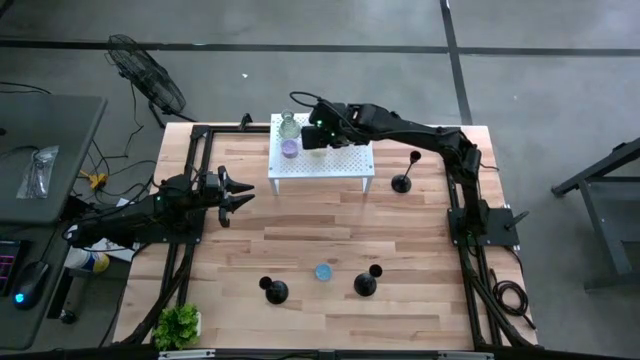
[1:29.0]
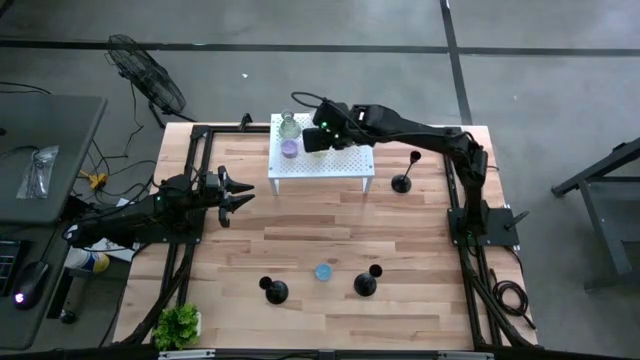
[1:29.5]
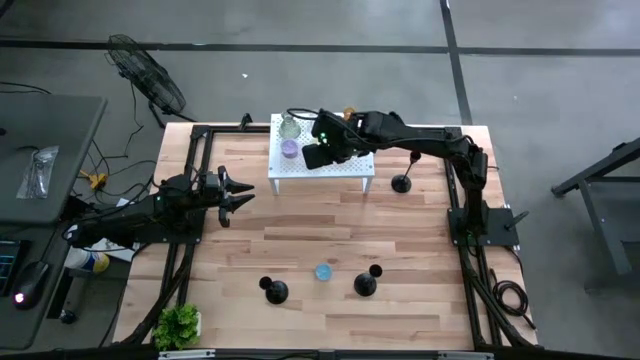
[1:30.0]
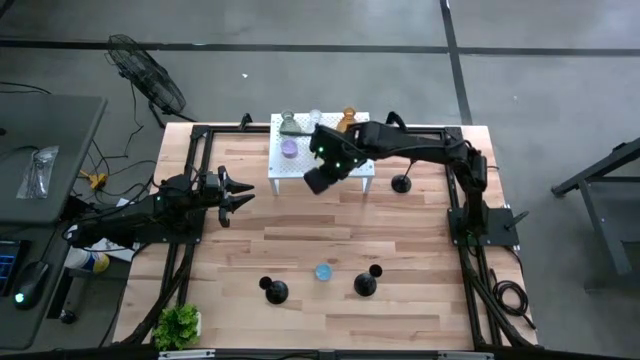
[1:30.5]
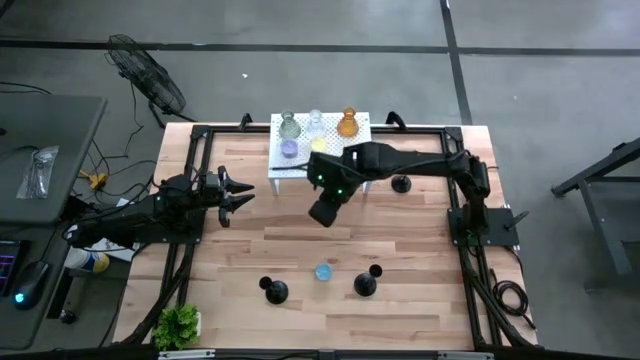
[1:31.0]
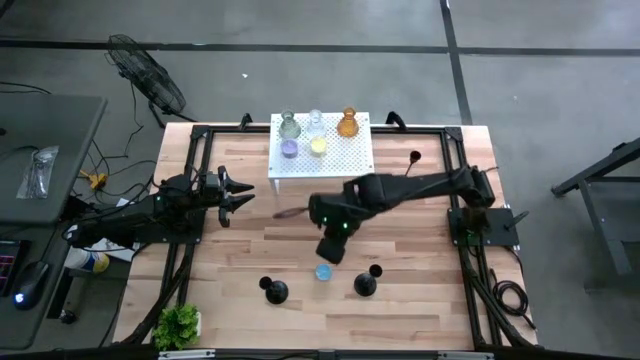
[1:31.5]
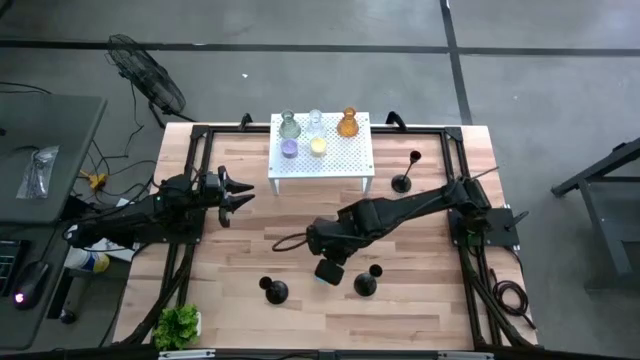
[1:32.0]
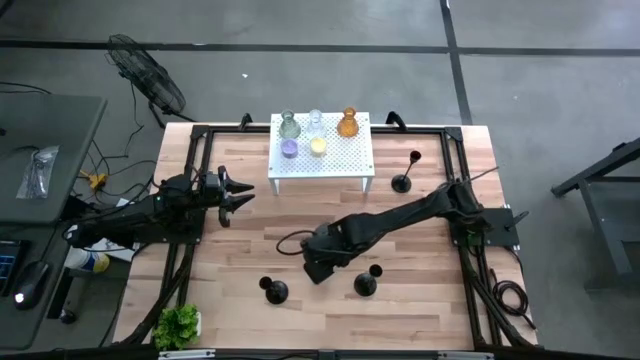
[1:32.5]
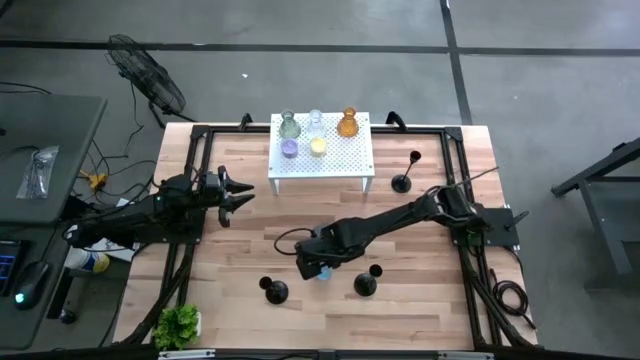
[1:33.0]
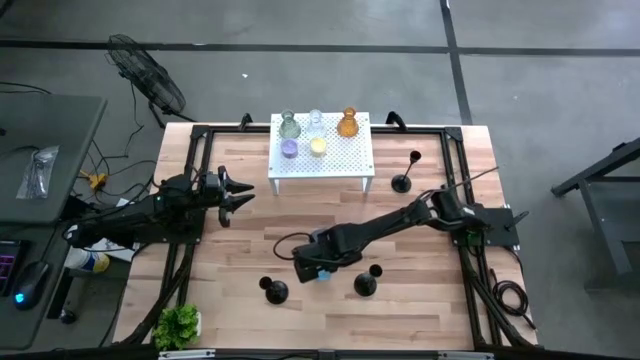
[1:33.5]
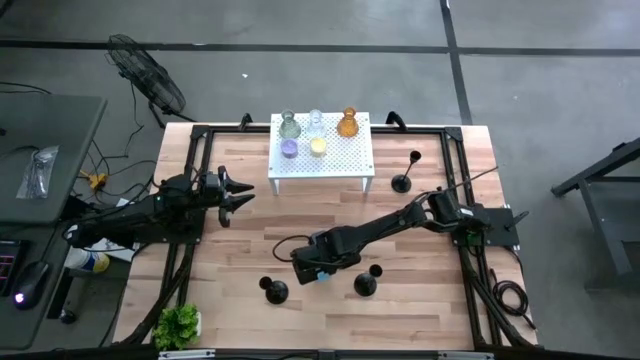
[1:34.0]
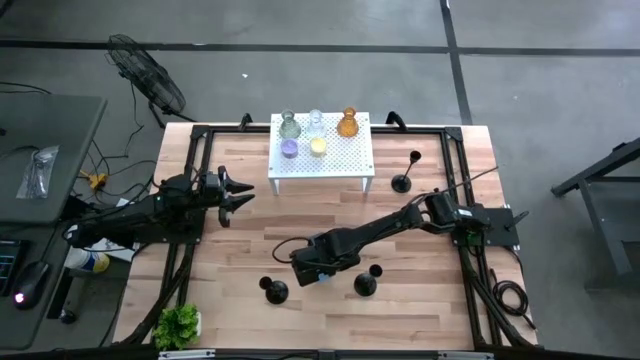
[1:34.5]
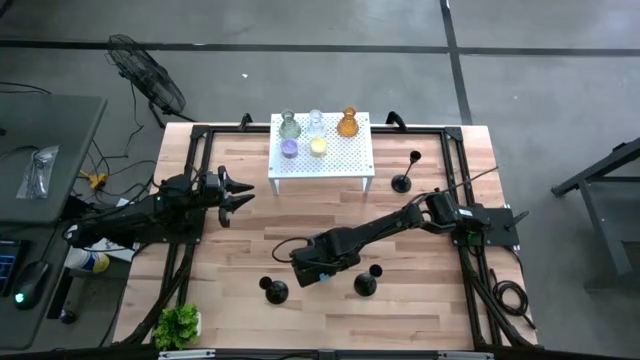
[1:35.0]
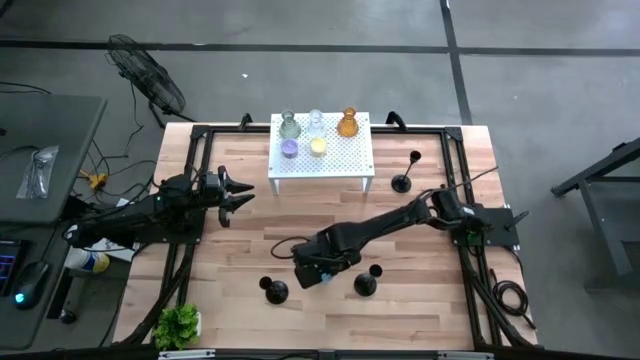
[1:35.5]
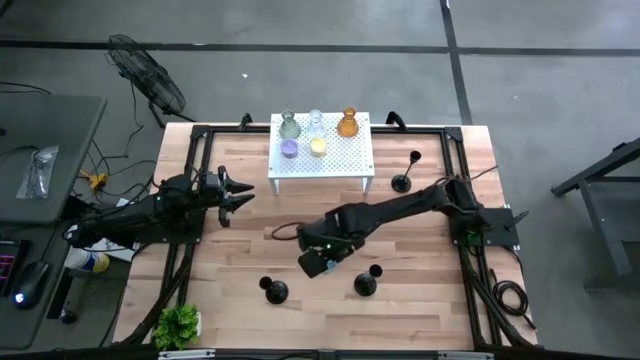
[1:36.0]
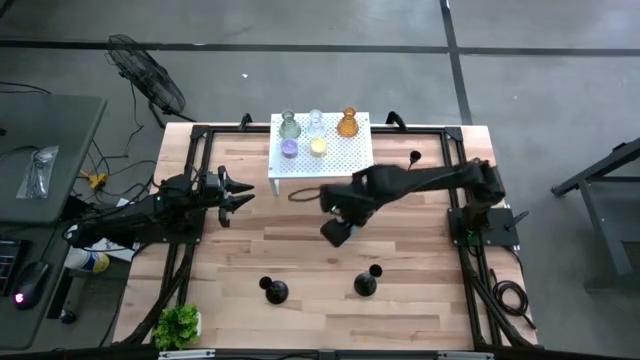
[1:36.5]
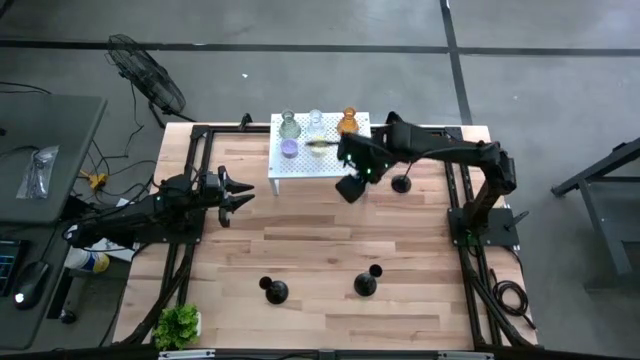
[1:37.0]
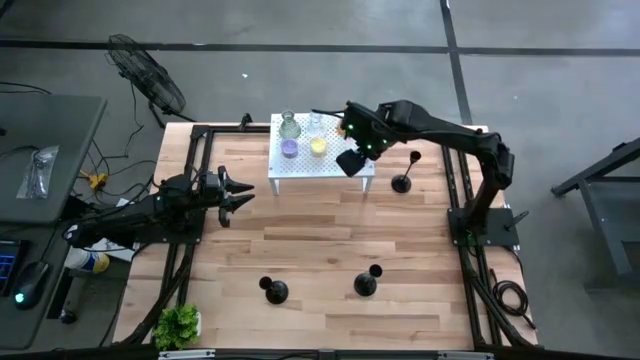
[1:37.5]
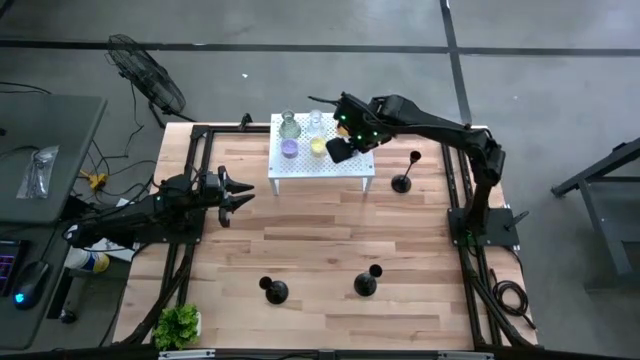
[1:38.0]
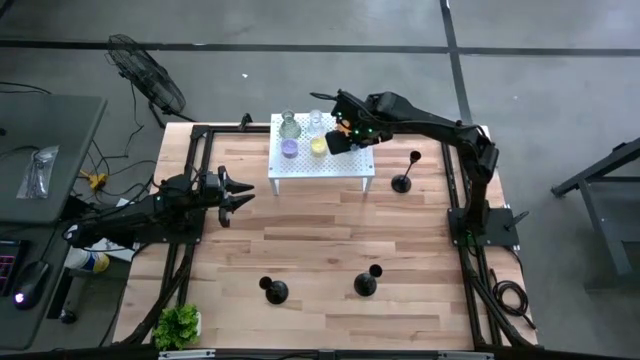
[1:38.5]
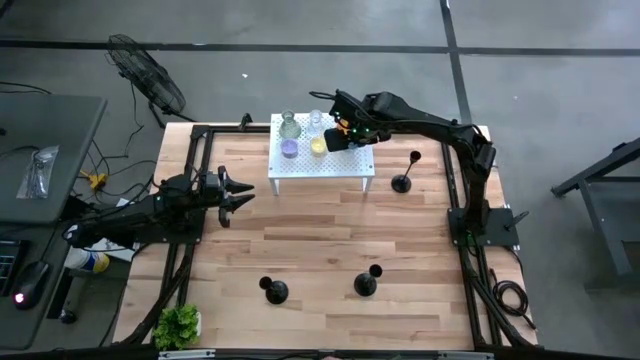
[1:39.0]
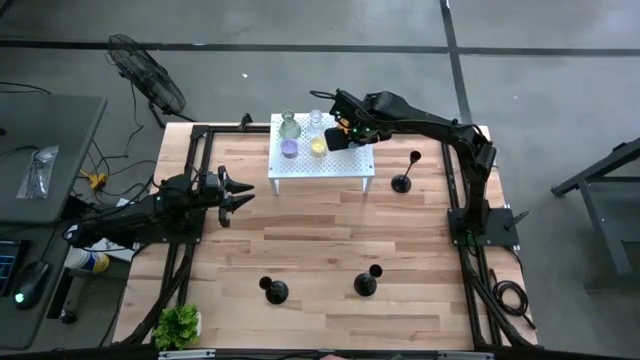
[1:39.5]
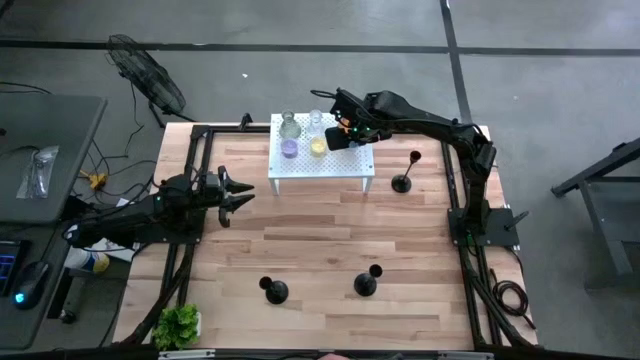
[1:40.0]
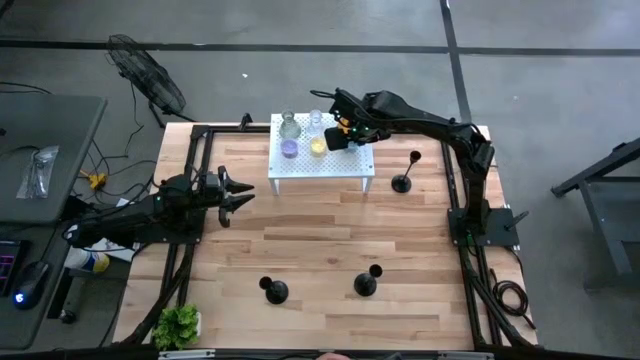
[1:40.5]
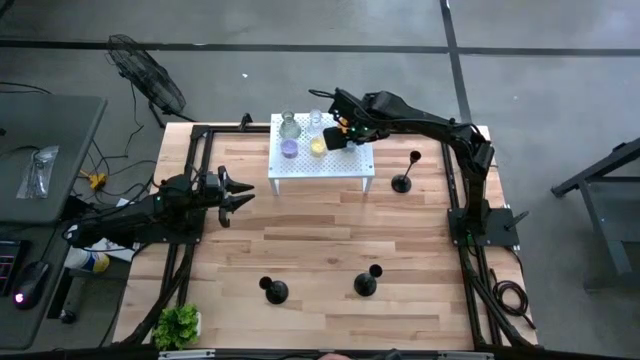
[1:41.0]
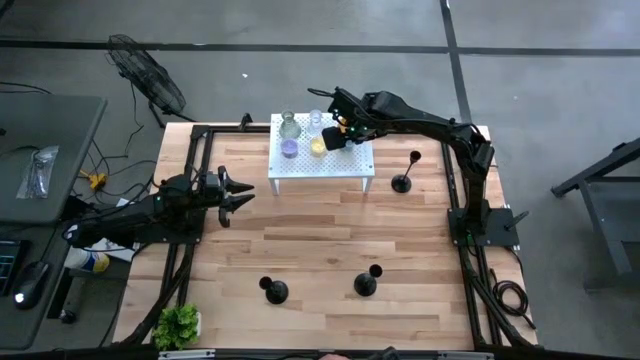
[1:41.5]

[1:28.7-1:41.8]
Task: Pick & Place candle stick holders
Put the blue scented candle on the shelf aligned with the other scented candles

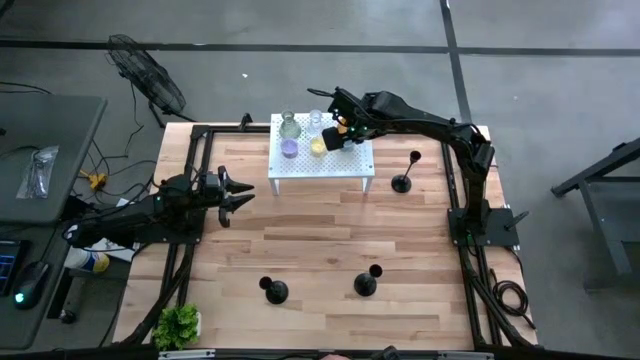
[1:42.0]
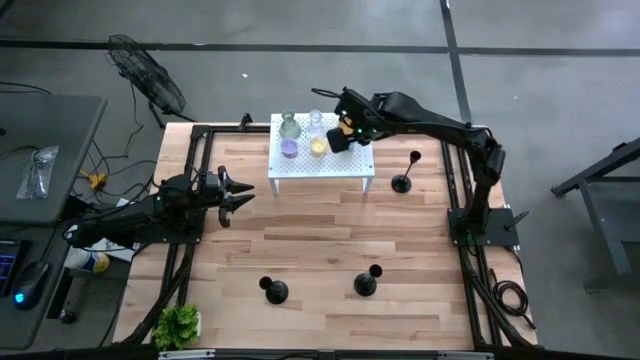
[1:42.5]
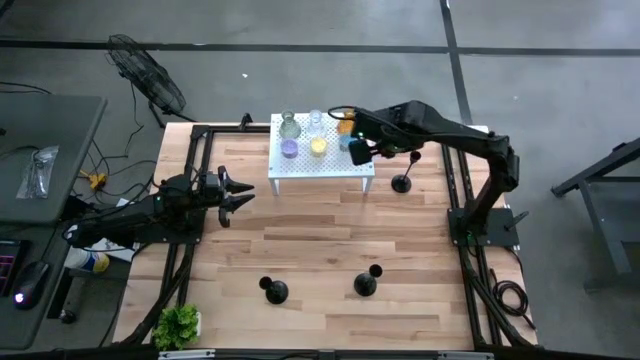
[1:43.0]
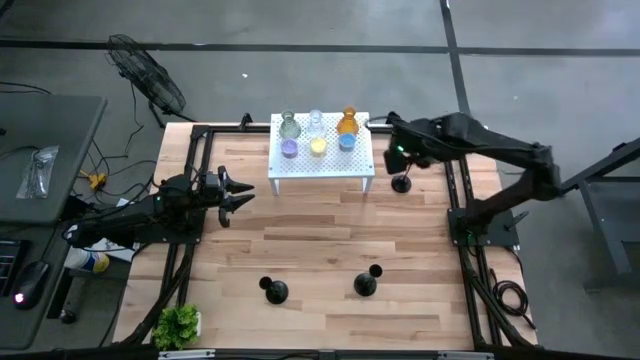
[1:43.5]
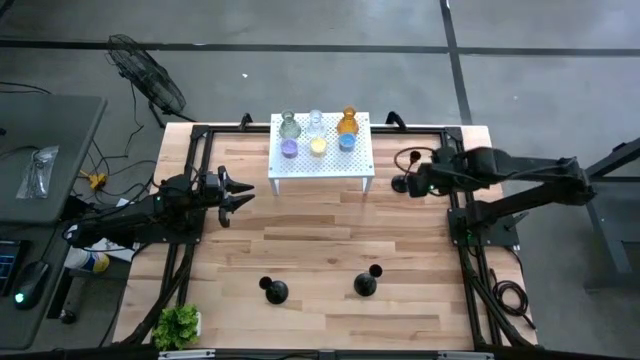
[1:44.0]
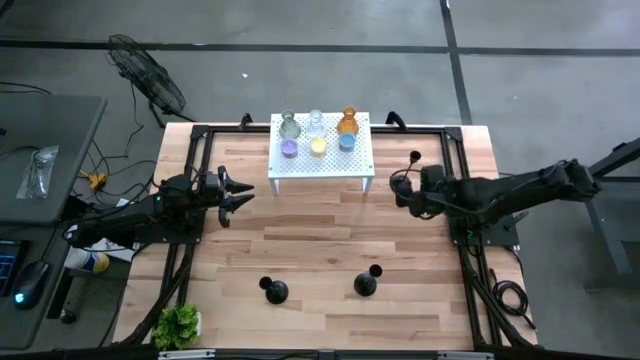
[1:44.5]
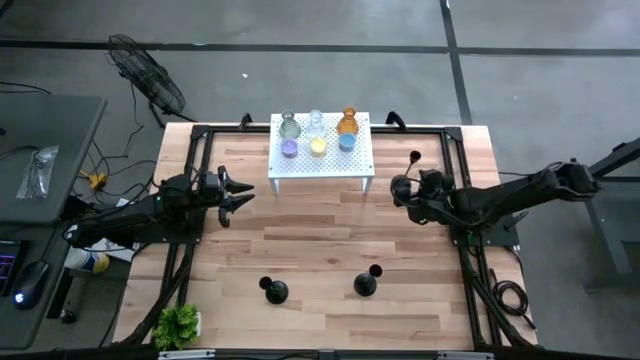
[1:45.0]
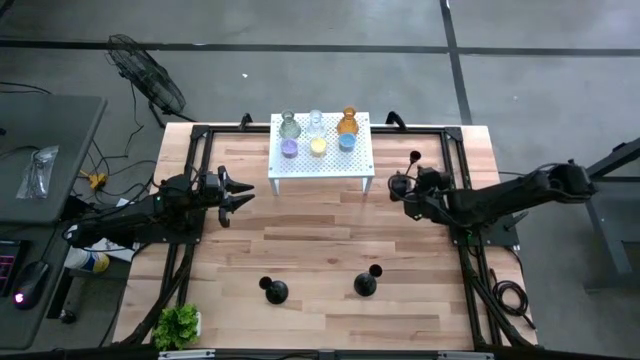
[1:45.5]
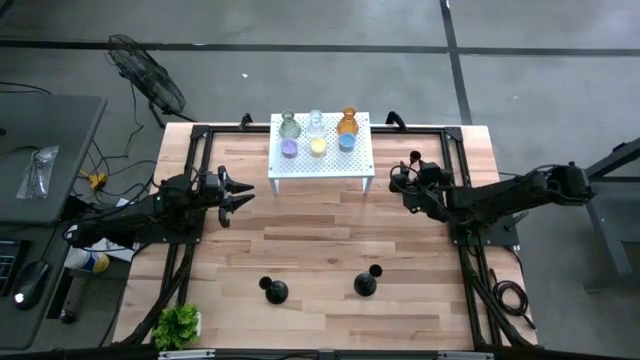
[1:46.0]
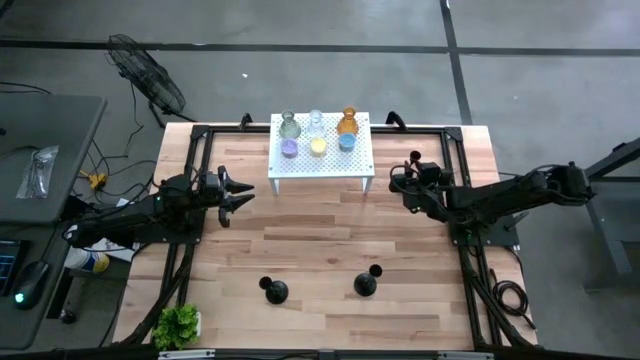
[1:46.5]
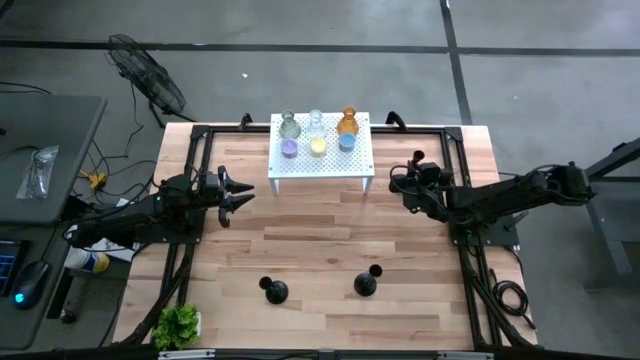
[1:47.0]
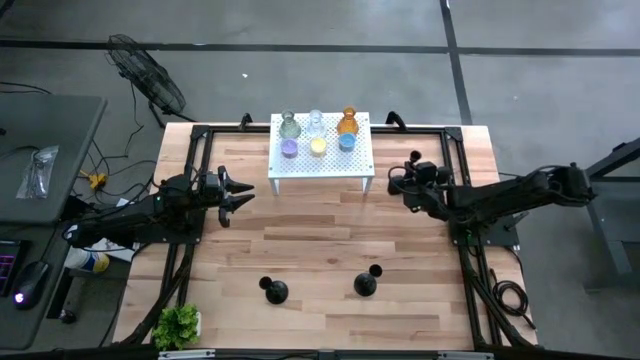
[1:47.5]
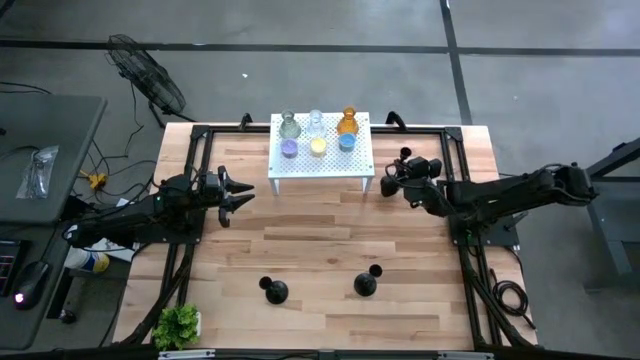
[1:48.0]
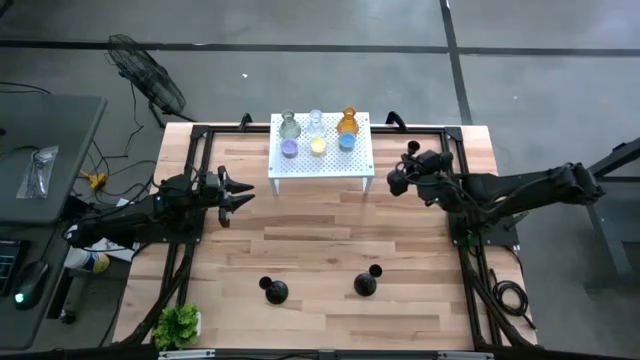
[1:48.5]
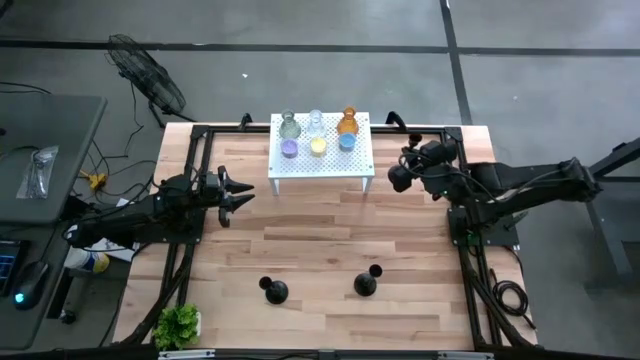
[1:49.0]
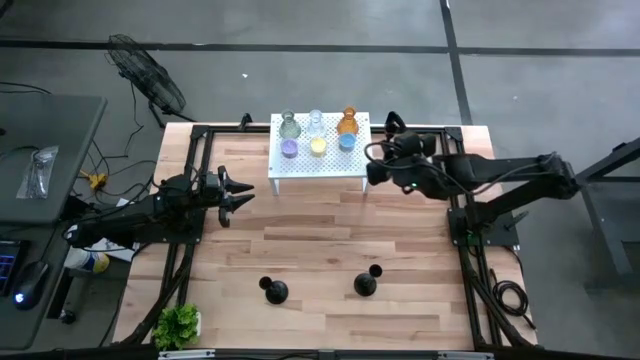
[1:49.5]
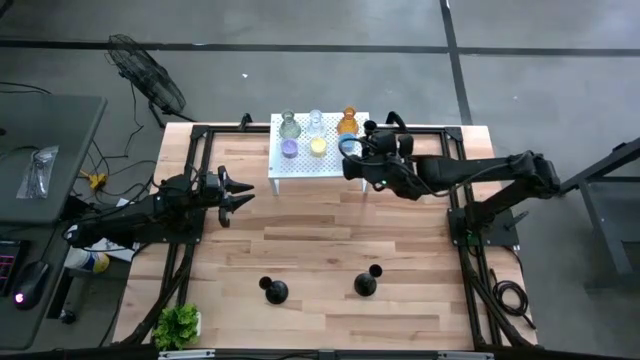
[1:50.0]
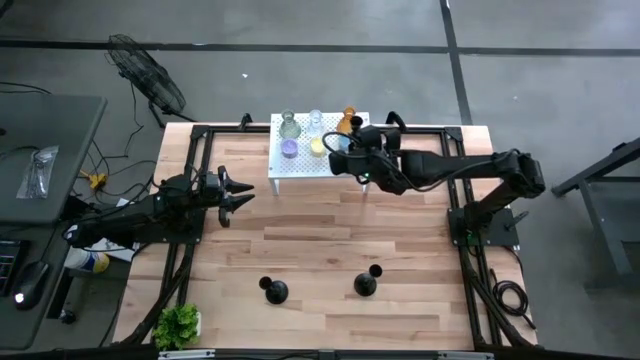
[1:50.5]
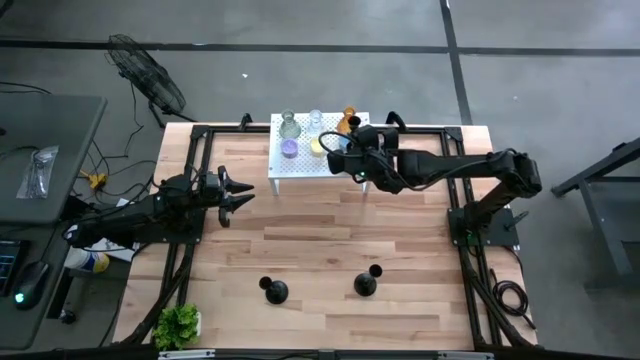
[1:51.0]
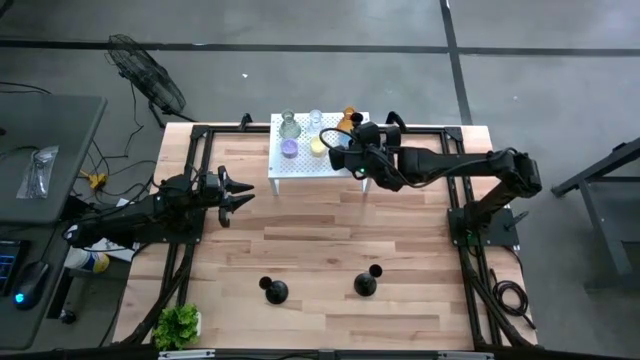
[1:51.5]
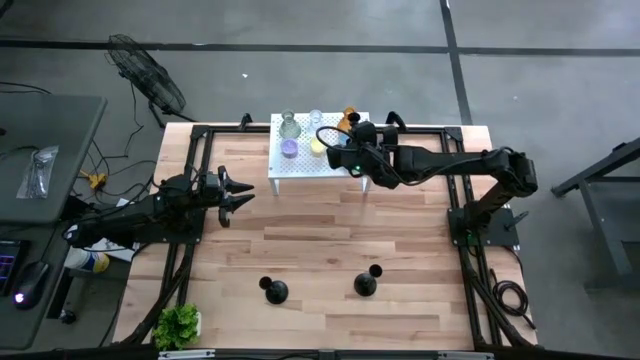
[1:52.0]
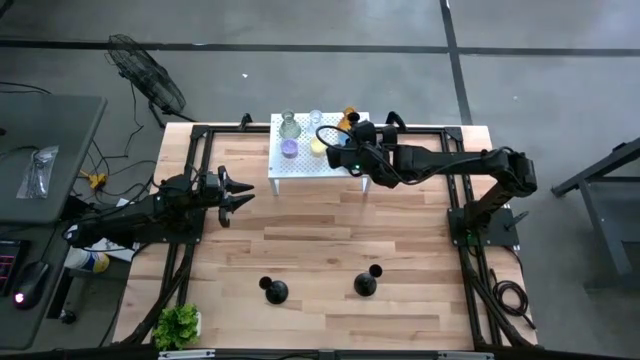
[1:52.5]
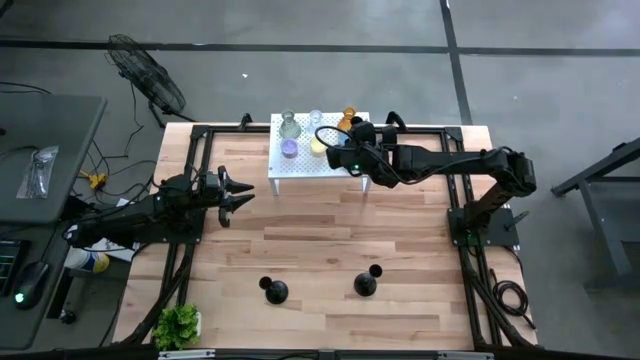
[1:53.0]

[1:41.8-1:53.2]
Put the top right black candle holder on the shelf
